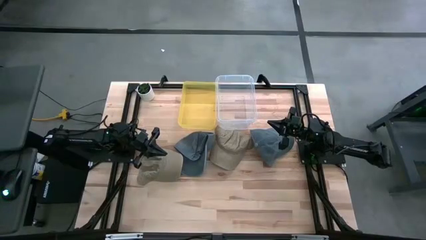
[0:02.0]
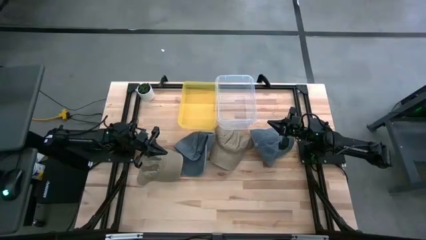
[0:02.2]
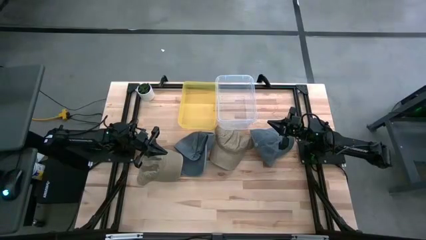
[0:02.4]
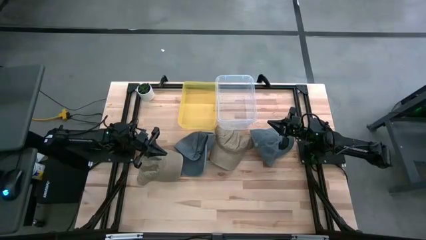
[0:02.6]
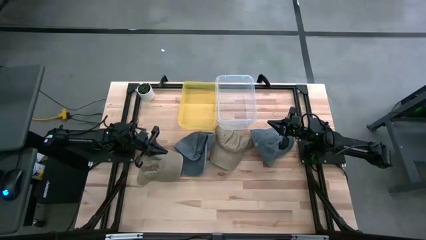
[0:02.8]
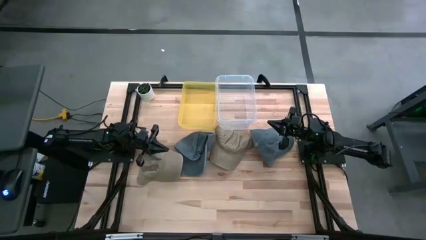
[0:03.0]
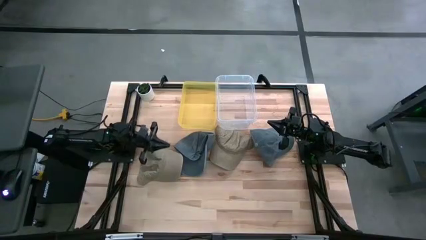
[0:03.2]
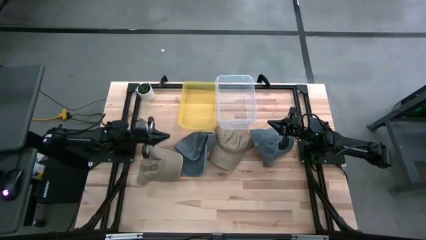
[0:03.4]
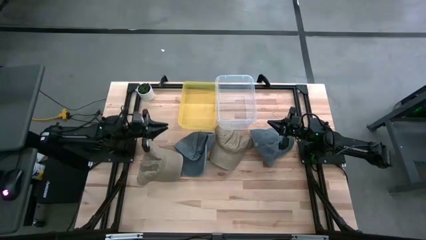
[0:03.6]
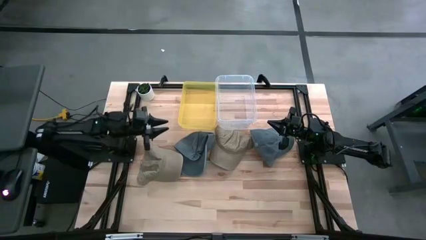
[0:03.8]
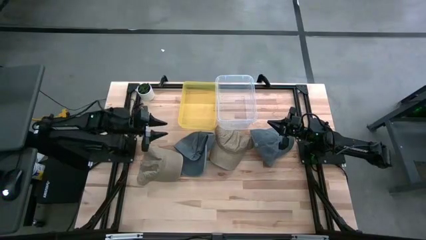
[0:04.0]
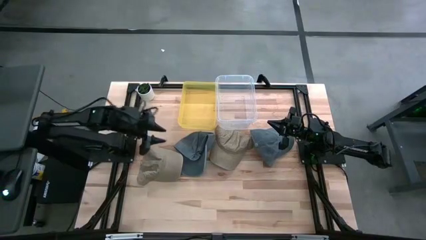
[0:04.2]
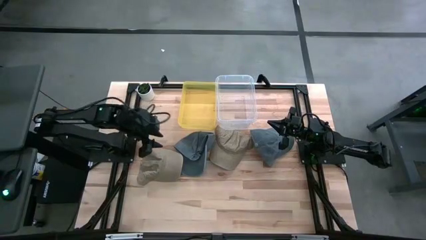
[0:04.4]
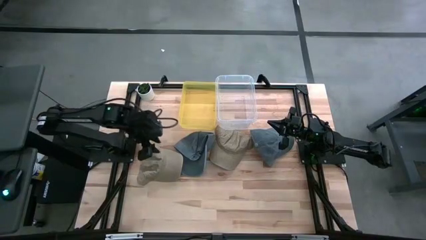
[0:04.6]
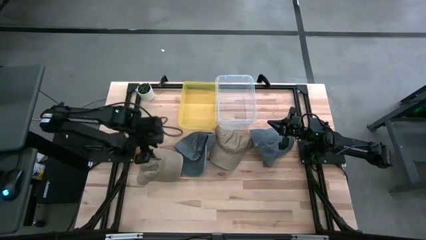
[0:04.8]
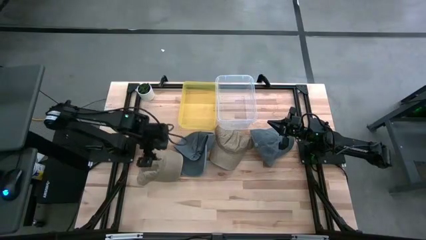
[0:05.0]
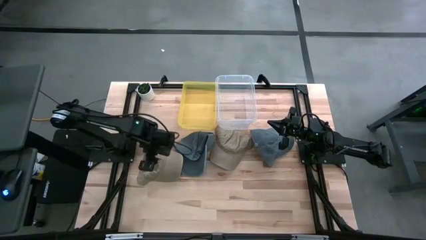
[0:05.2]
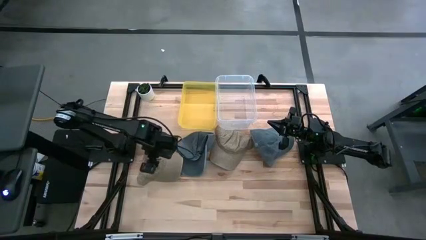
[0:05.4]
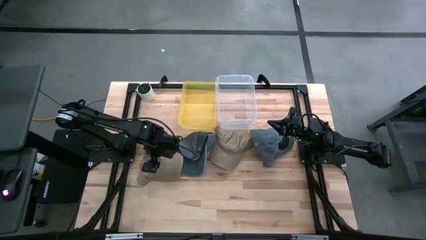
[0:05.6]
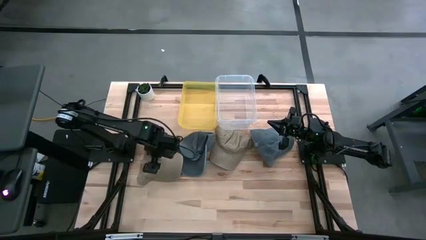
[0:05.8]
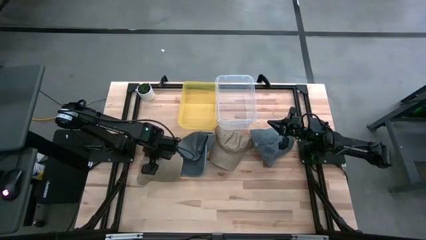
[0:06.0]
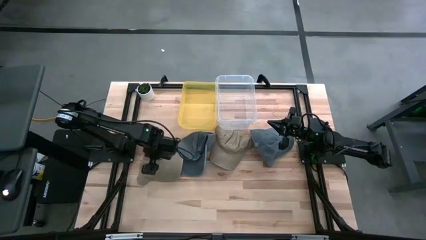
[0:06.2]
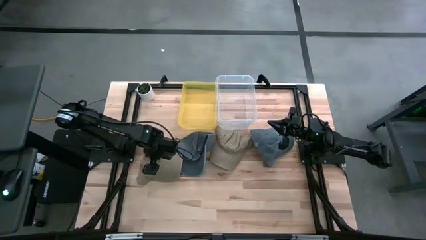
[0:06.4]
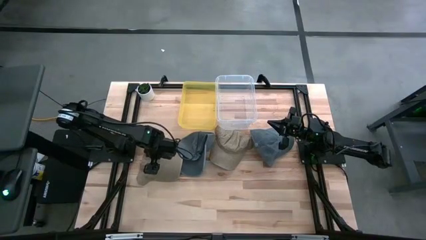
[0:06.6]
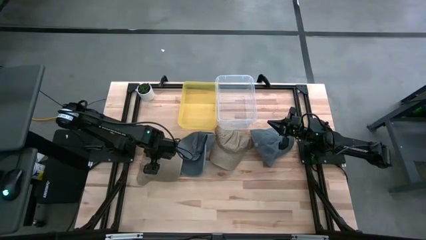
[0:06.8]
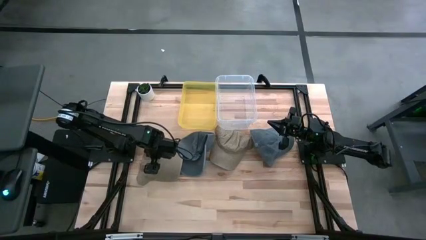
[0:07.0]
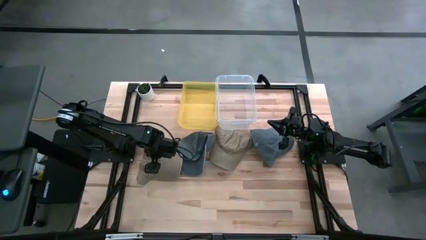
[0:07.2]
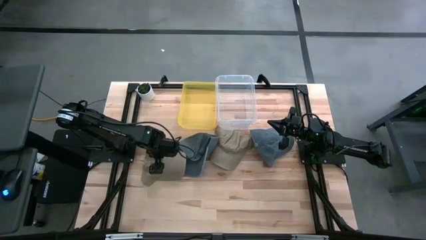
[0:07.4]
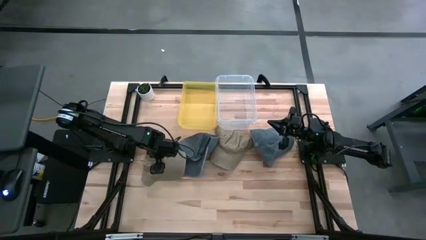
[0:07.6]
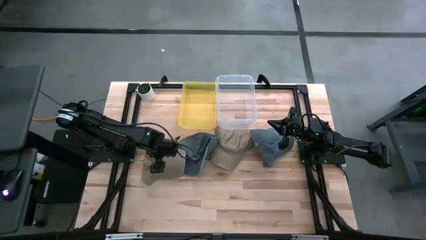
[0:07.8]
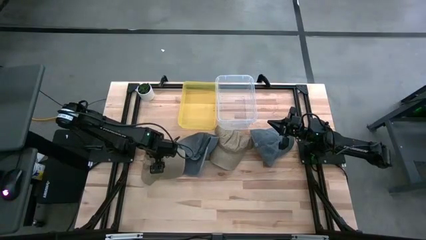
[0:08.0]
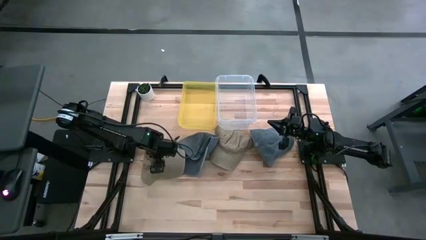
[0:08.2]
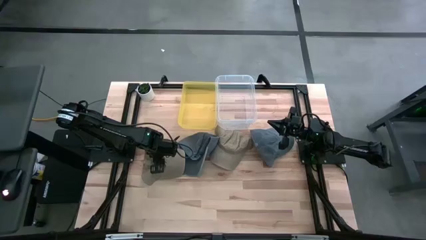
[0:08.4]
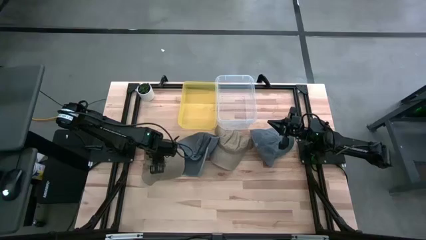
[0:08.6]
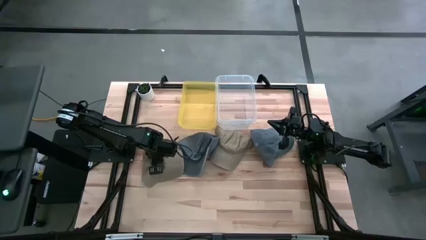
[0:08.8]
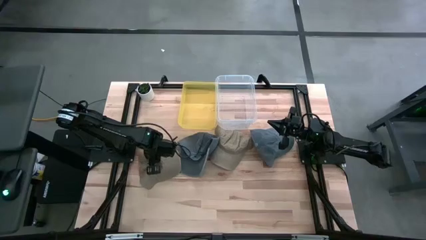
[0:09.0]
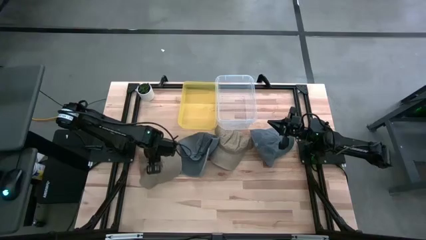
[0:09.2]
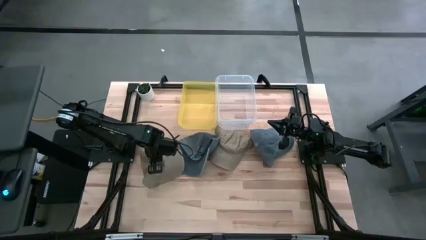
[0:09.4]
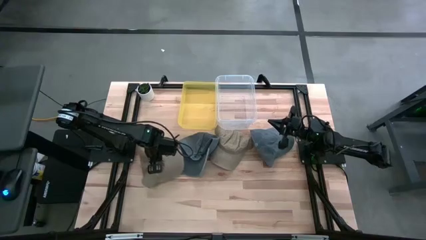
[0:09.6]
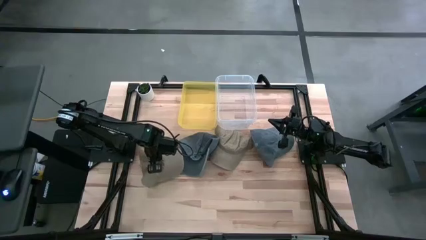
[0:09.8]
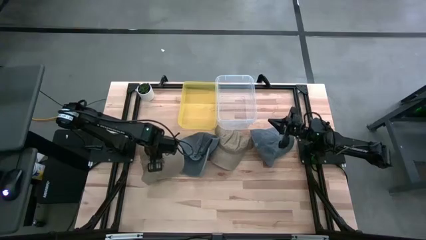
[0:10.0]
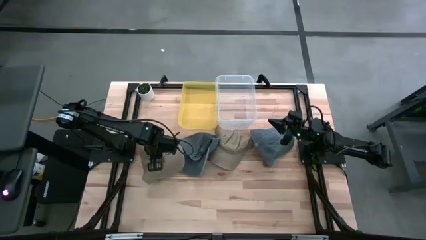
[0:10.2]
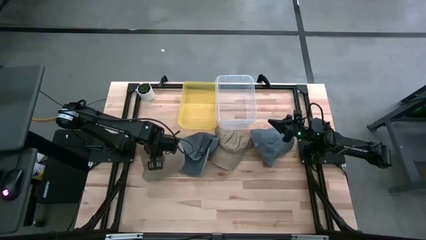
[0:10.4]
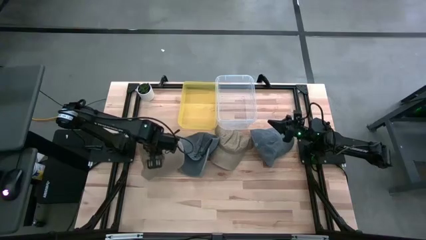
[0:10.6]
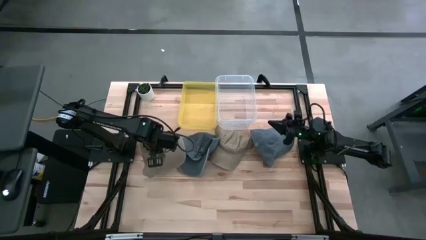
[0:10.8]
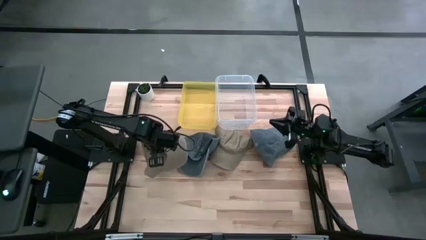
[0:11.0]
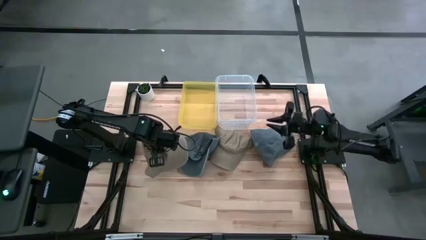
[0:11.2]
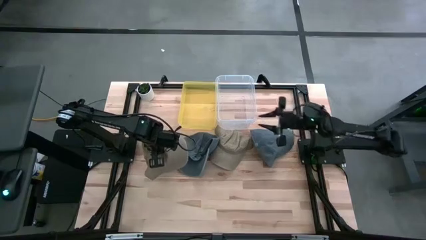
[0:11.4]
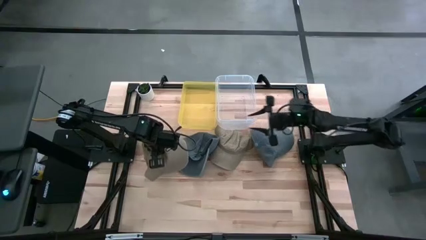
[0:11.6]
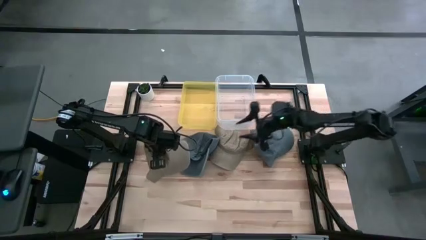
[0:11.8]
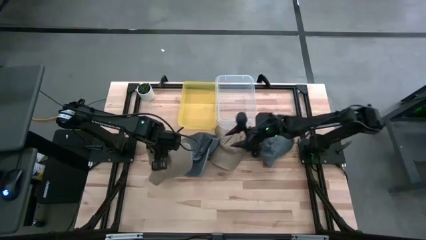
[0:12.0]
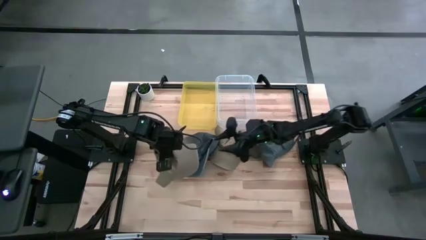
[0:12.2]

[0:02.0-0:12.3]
Task: Pick & Place hat
Put the left brown cap into the transparent bin
